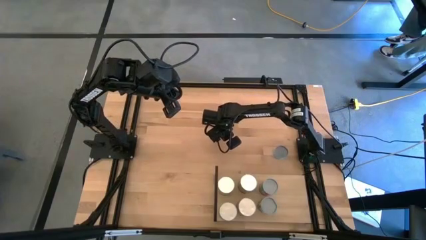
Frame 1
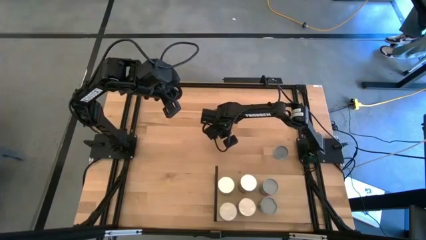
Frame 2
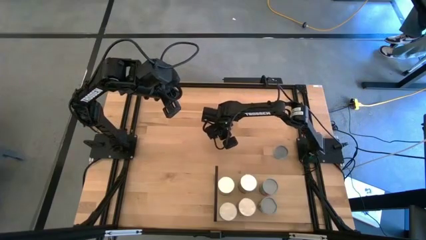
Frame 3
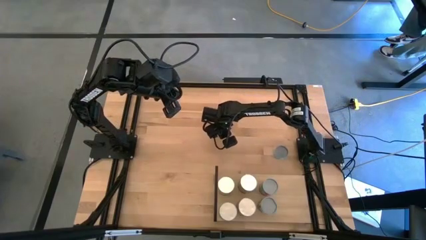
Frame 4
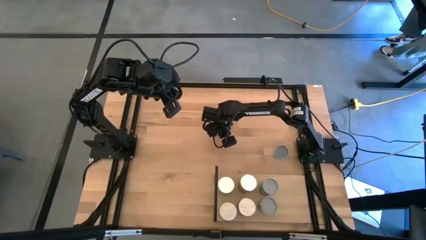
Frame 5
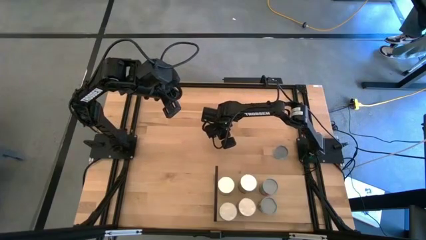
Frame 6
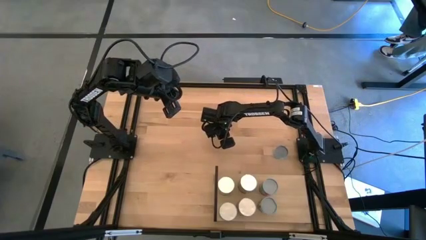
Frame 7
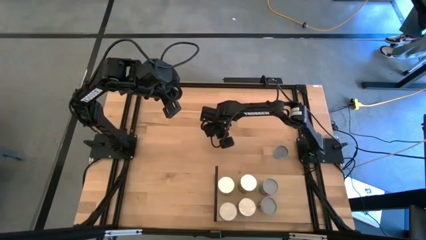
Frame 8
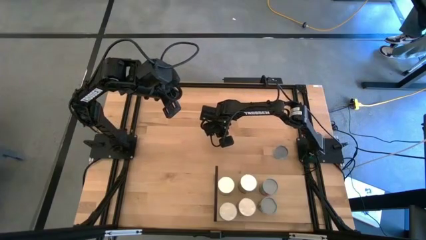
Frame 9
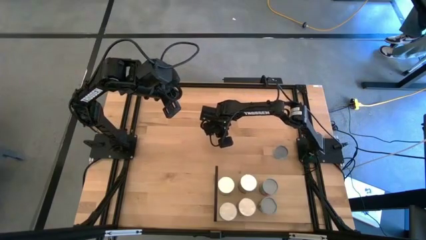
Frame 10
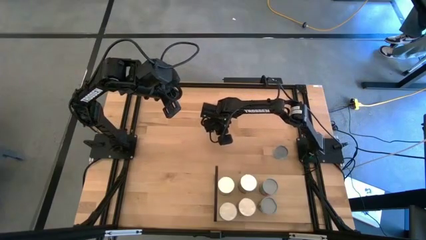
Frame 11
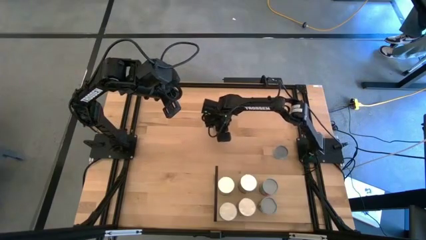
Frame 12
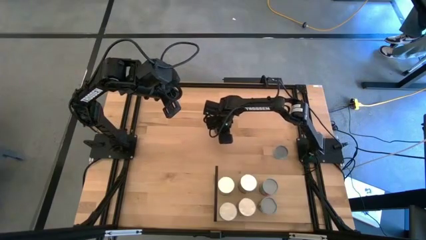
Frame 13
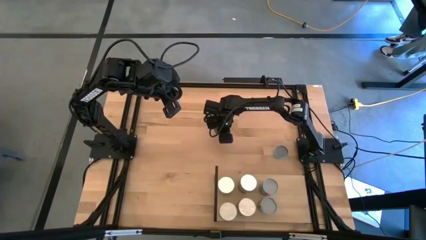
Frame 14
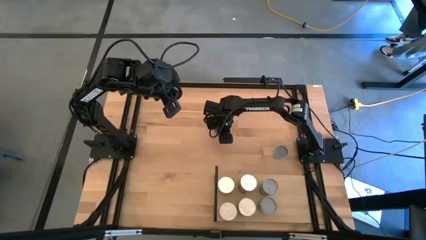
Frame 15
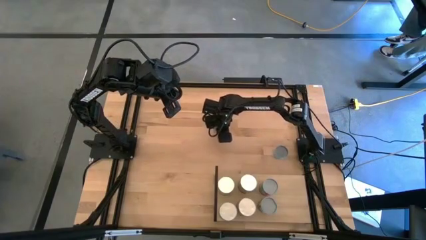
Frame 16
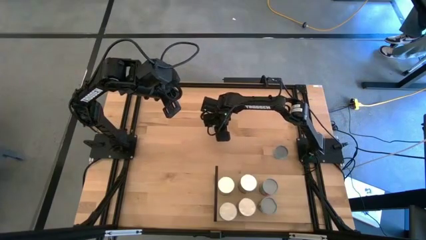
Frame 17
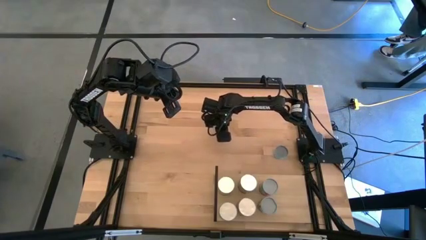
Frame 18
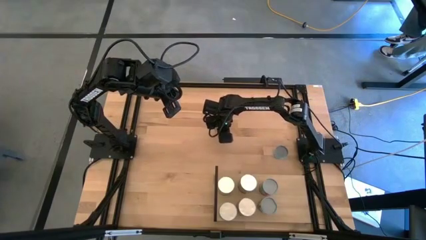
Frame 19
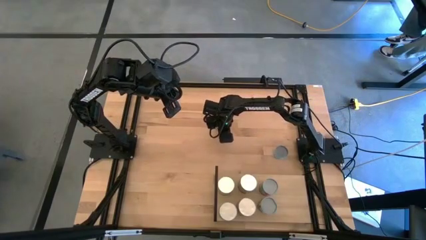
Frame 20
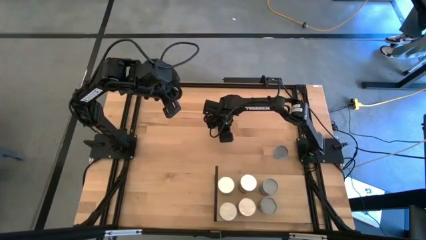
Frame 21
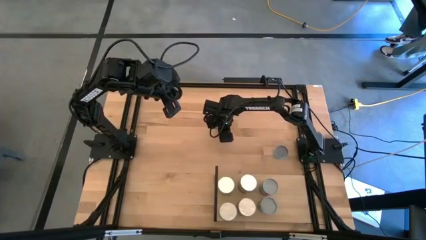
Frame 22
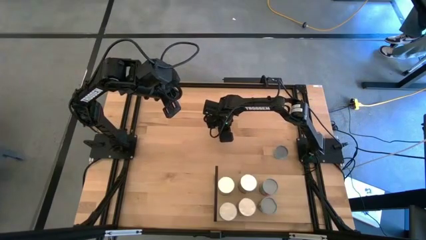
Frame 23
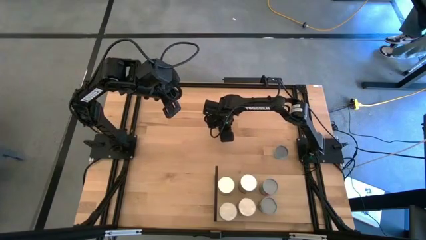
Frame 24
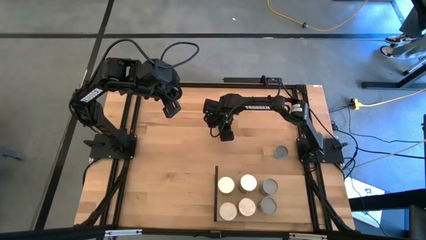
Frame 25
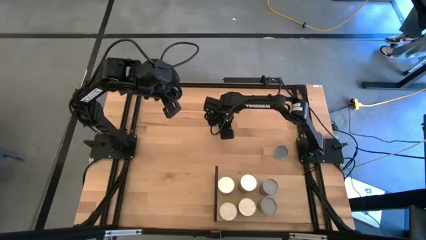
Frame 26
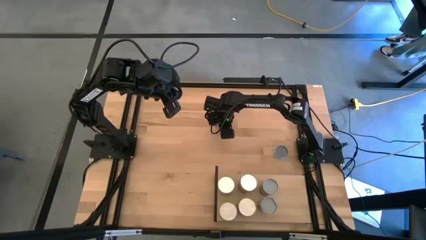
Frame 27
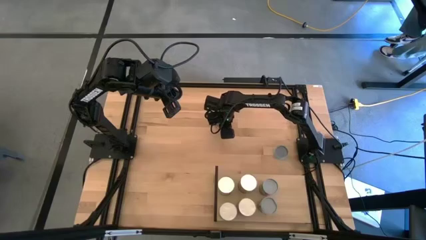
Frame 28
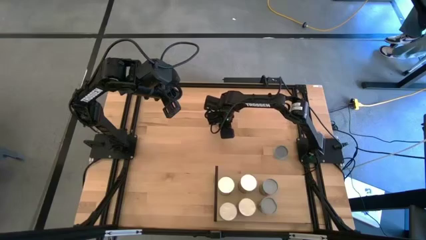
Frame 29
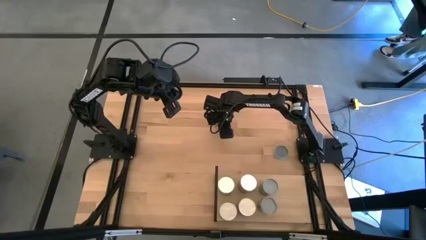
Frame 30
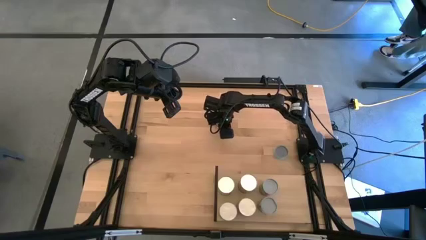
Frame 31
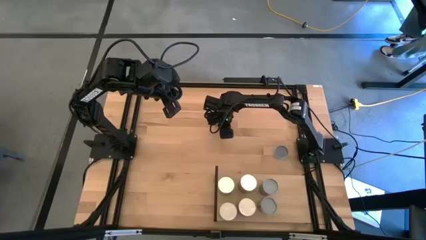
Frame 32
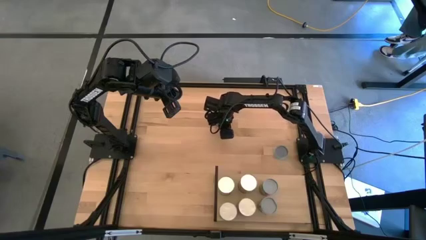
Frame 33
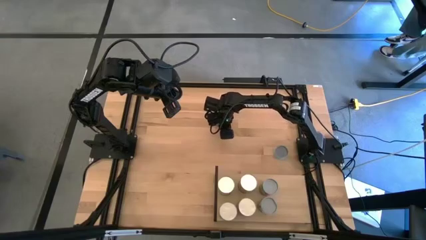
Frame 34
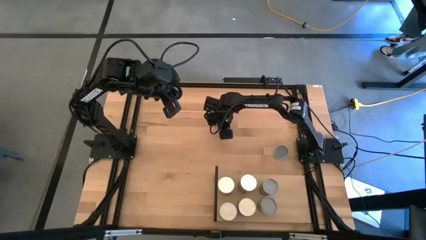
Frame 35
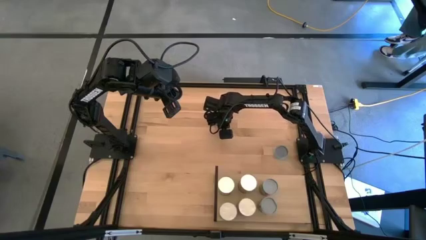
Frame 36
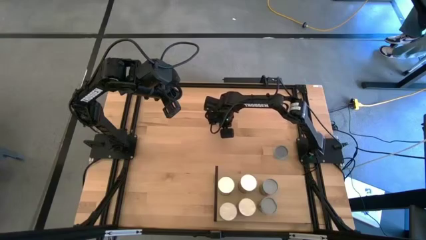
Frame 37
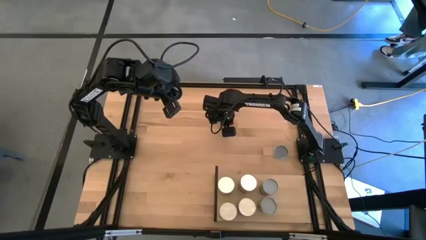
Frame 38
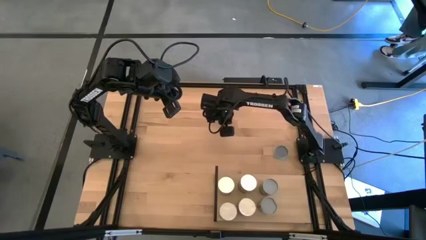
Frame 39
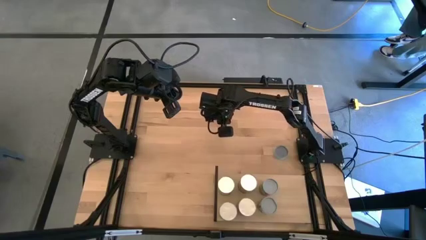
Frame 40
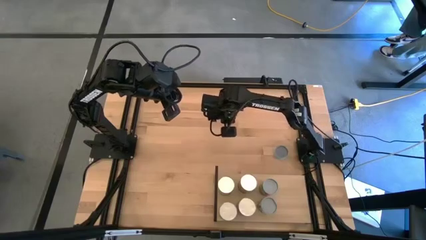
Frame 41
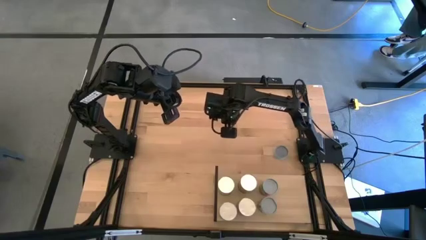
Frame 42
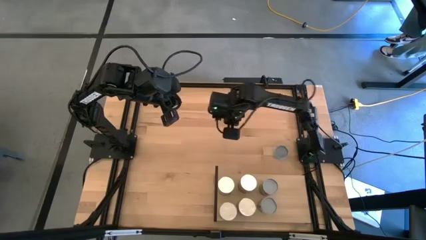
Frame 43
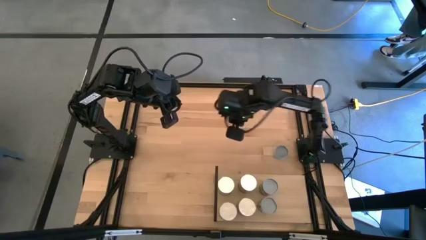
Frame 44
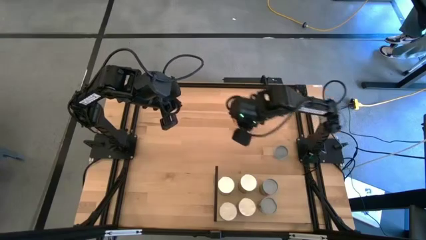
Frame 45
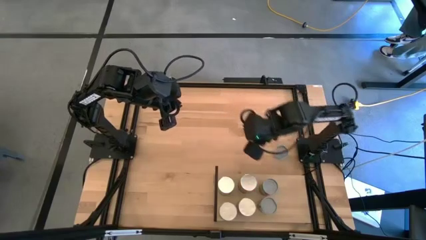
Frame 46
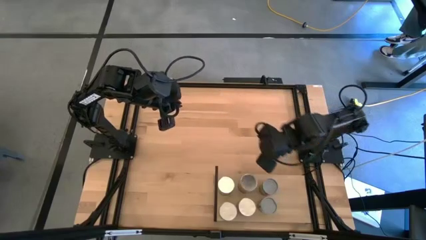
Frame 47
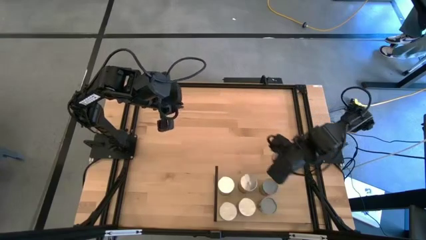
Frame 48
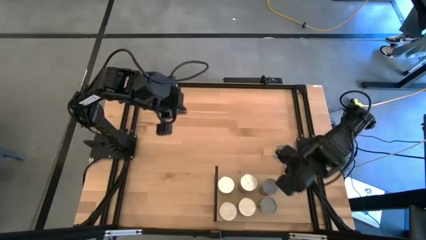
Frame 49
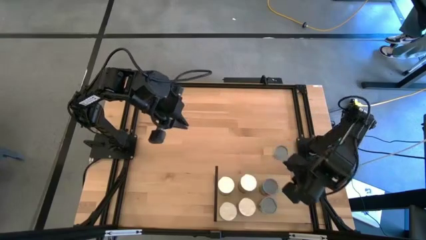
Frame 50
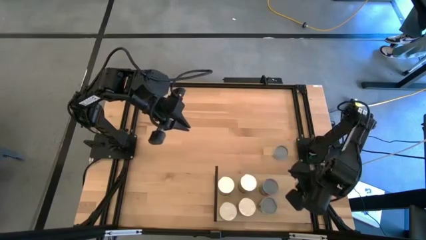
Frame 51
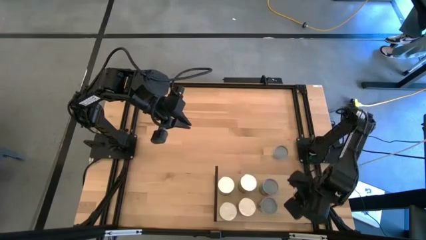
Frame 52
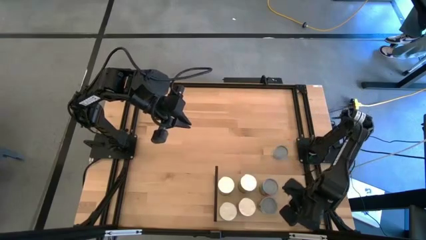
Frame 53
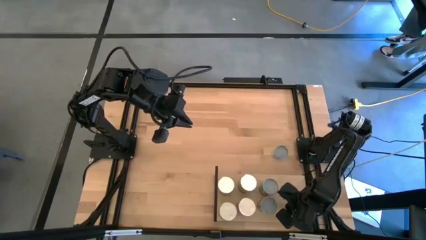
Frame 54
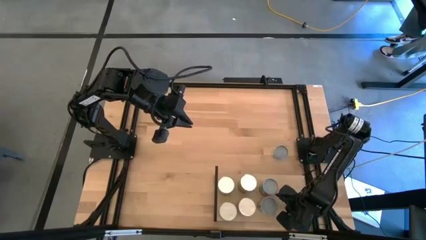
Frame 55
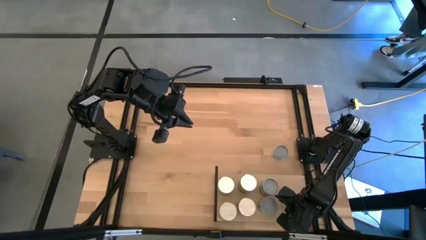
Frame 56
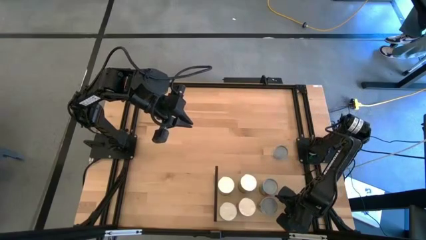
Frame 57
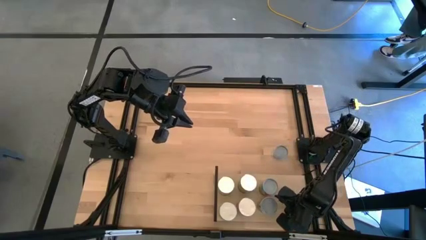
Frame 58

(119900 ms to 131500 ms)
Task: Pick and place cans onto a shelf
Put the canned orange on the shelf

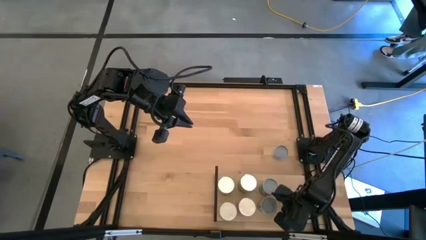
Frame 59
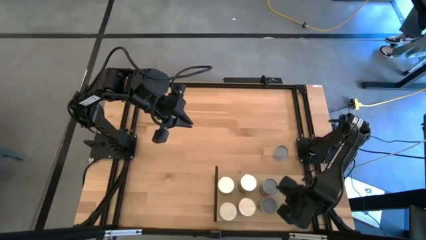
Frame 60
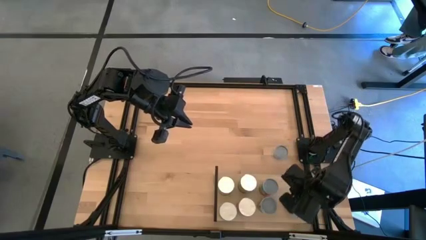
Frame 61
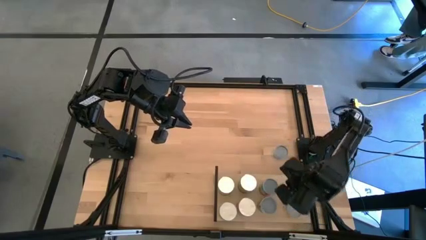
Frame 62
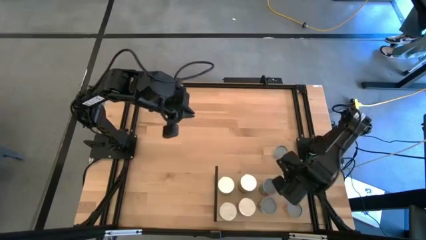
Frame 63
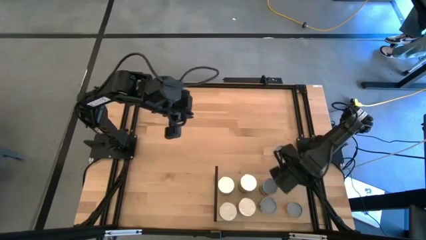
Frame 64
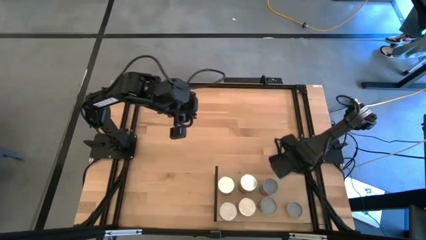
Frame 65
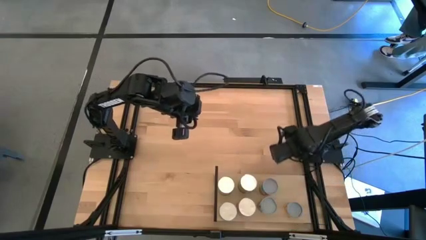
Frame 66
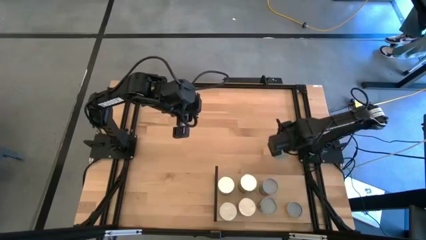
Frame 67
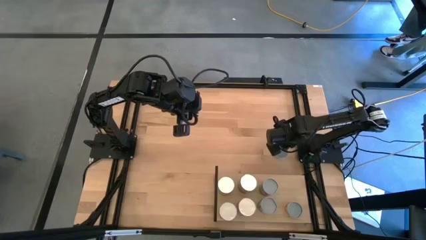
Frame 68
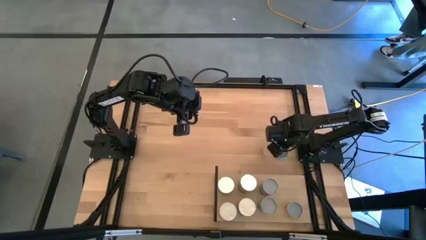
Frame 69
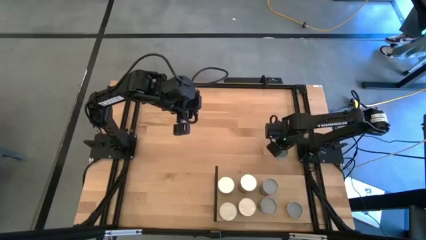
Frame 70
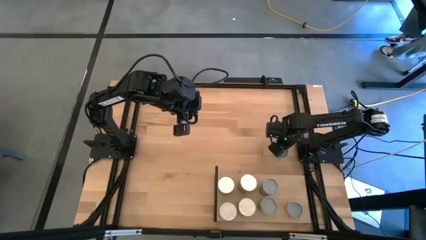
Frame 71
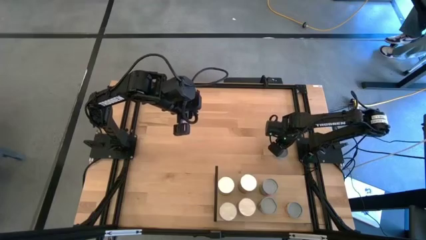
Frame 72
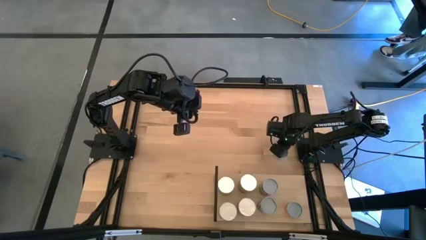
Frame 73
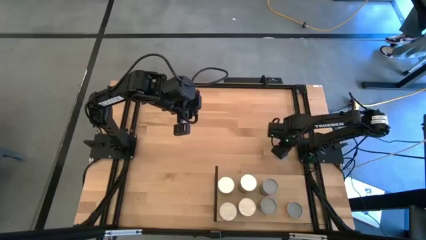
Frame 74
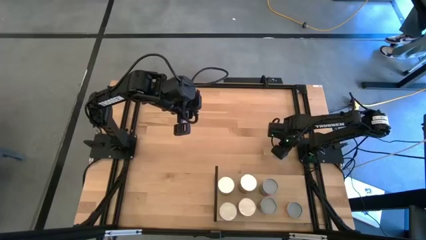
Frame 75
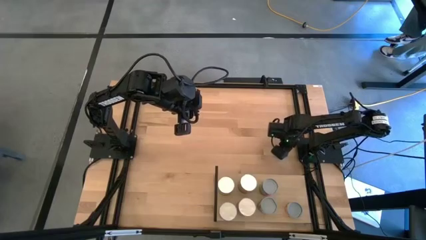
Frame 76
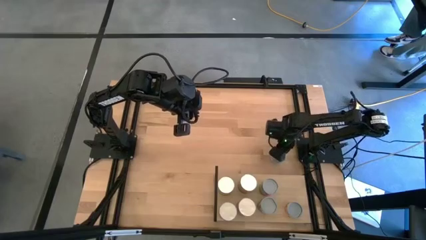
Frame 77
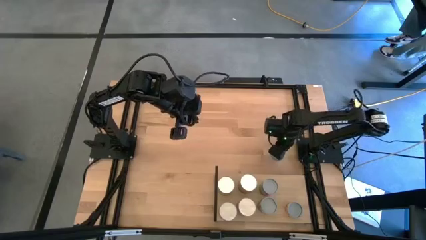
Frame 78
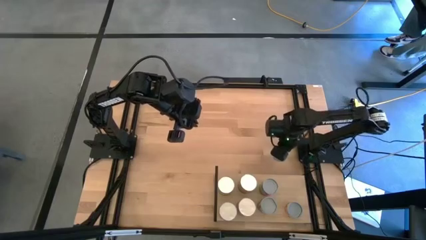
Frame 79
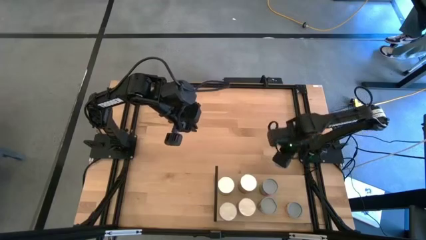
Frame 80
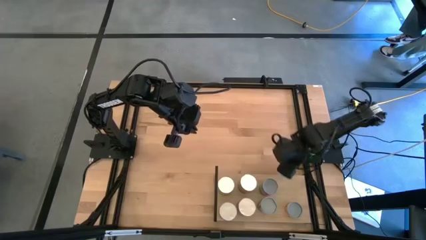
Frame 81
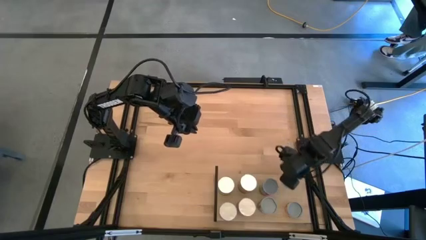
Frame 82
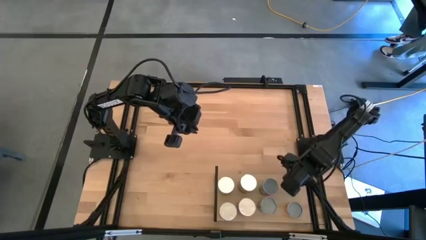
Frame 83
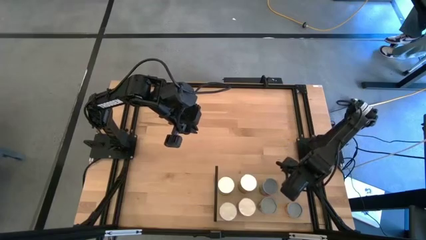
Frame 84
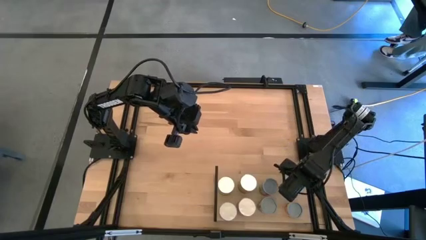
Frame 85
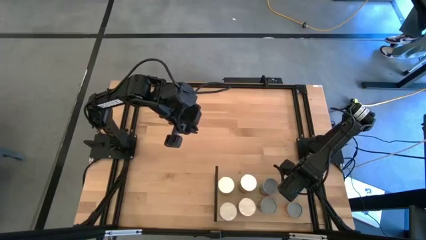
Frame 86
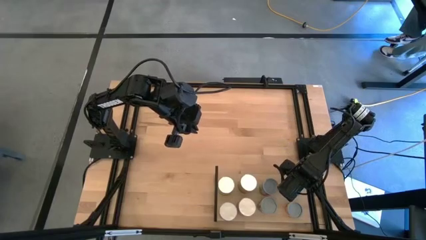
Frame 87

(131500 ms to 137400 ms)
Put the canned tuna on the shelf
